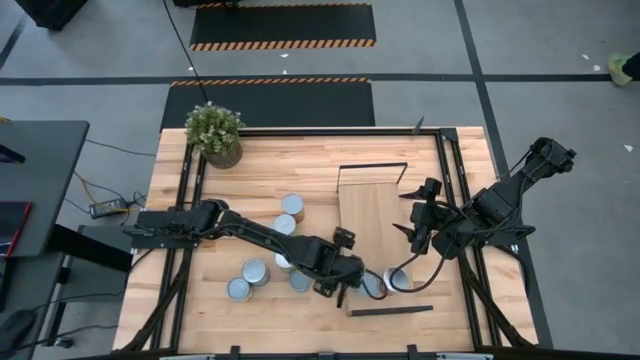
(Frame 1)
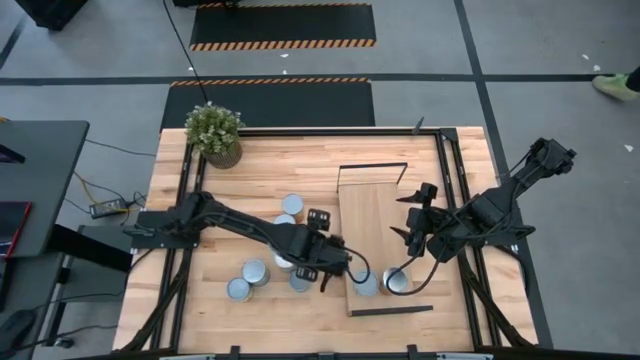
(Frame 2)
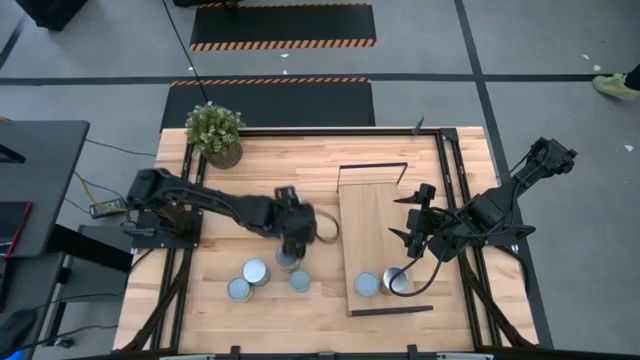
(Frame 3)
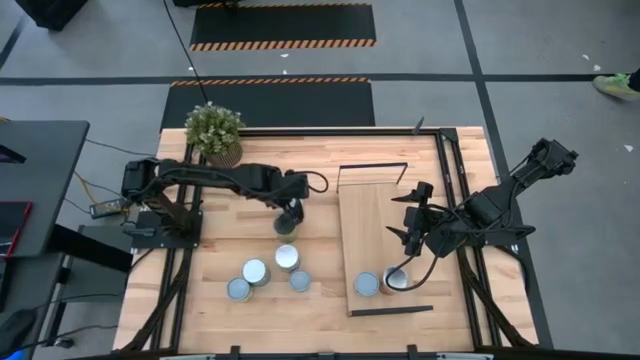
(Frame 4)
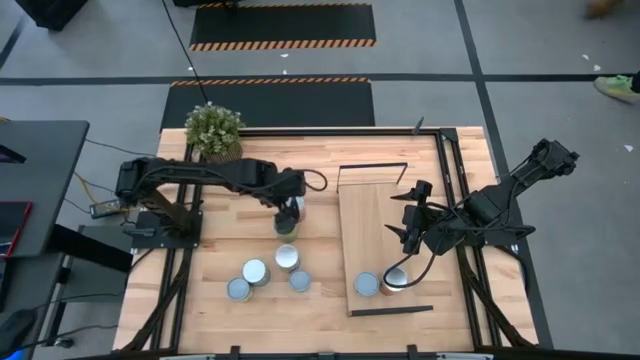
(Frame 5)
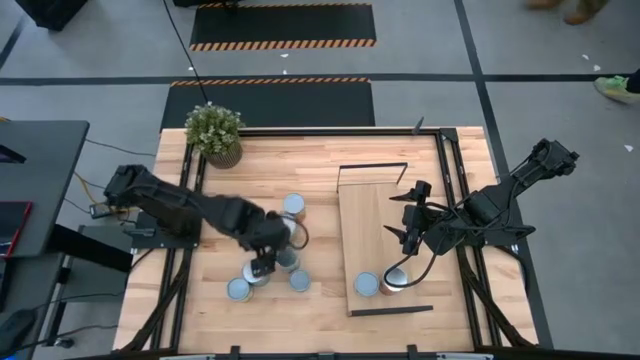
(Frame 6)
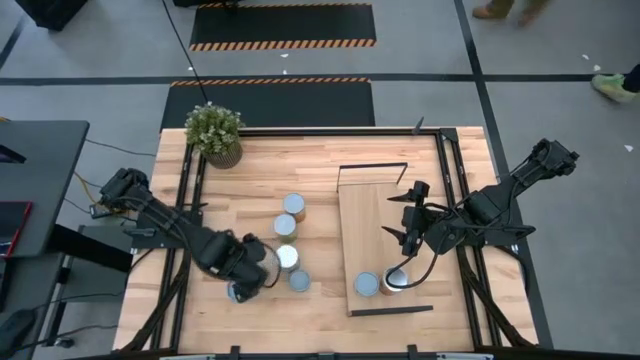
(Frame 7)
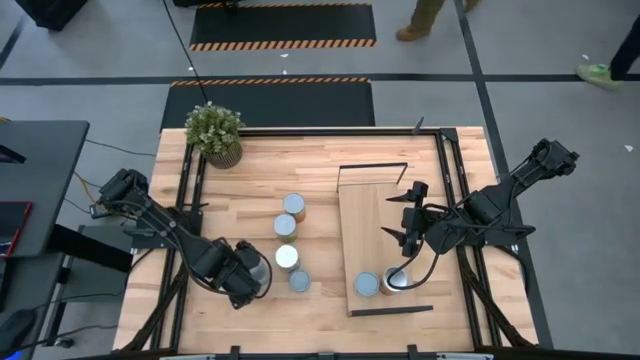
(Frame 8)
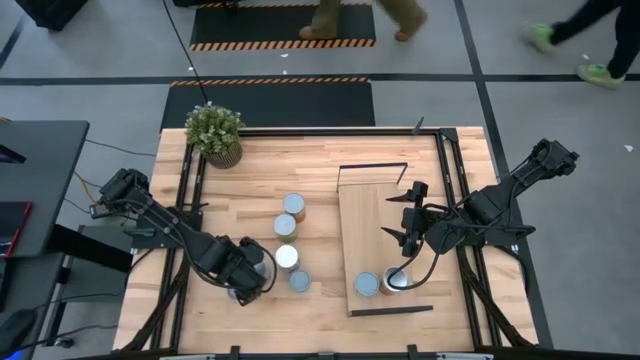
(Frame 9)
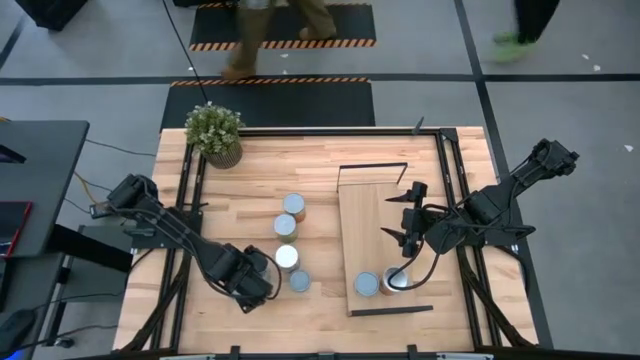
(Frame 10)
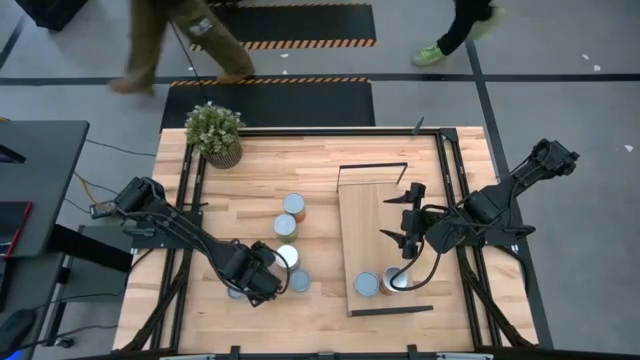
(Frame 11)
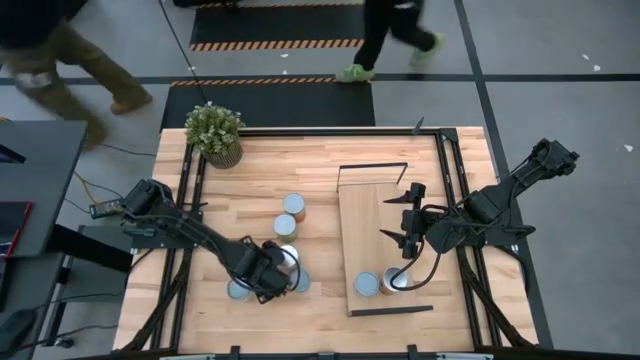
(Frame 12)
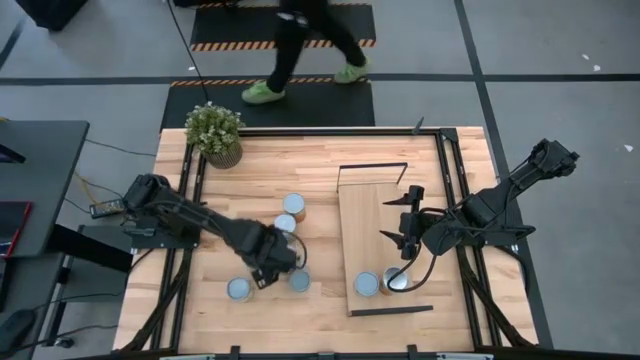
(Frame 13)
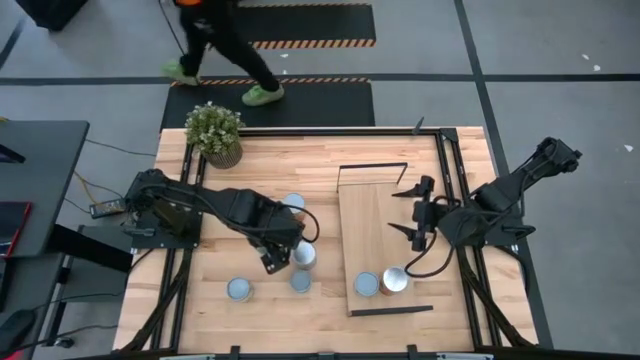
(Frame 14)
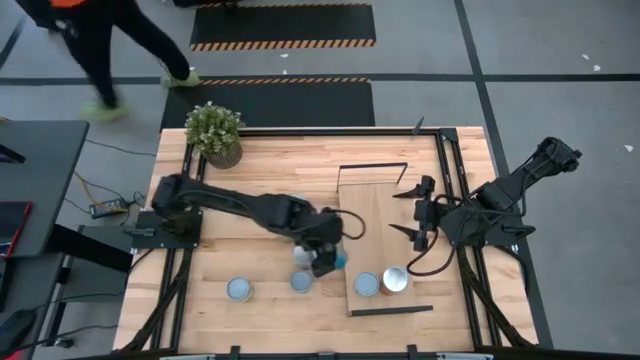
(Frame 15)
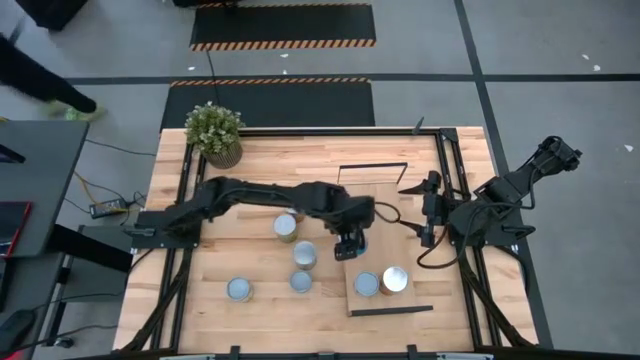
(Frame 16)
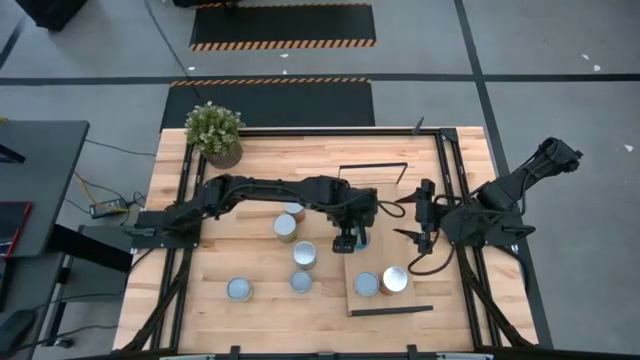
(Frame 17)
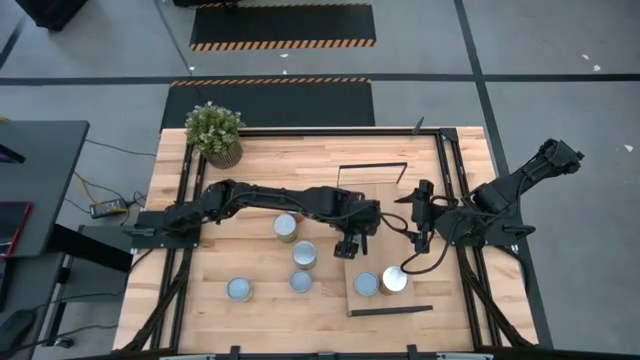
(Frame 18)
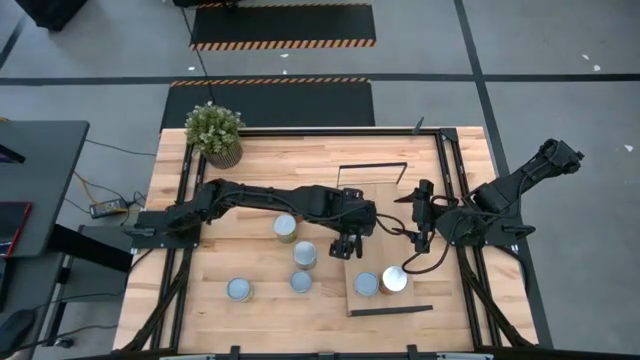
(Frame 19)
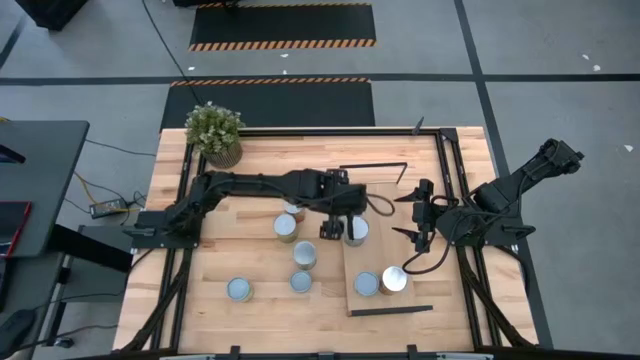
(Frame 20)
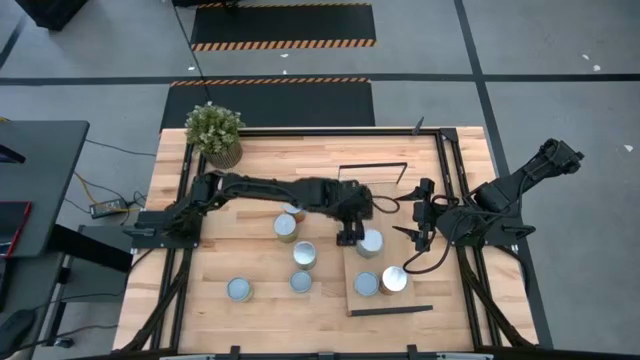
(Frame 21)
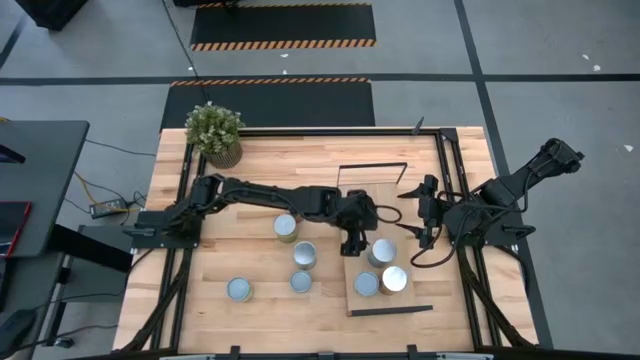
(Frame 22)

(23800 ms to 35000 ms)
Task: Pick and place cans onto a shelf
Put the canned cherries on the shelf

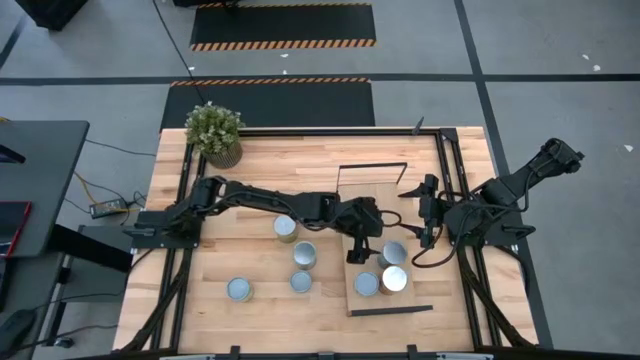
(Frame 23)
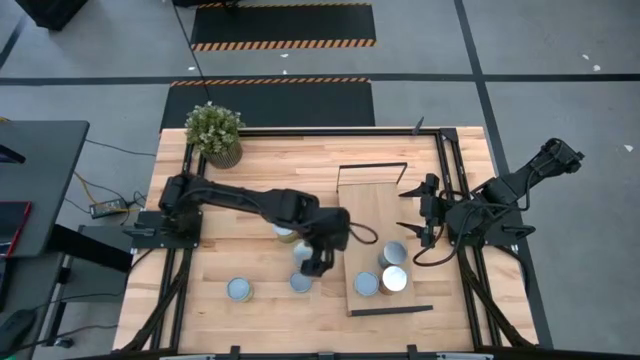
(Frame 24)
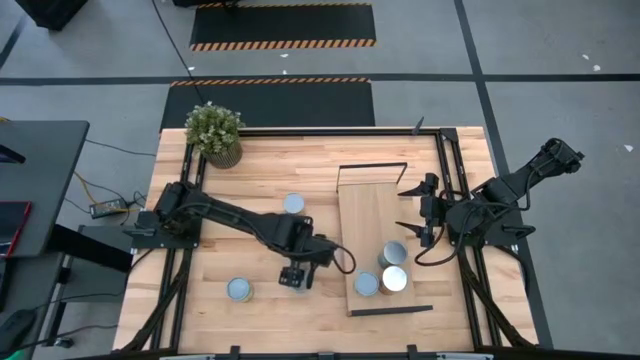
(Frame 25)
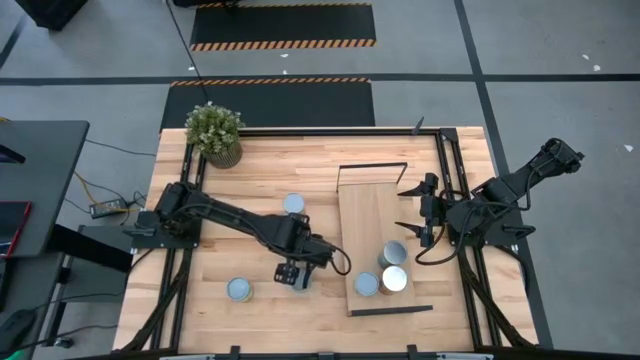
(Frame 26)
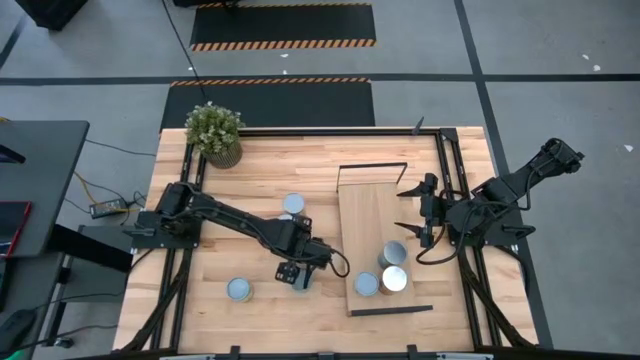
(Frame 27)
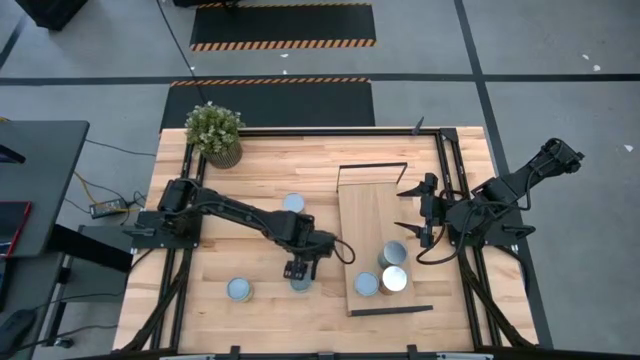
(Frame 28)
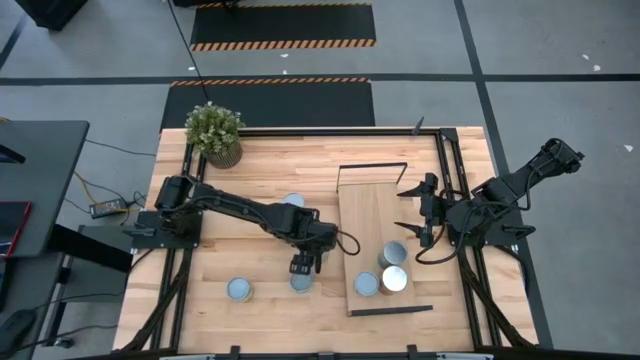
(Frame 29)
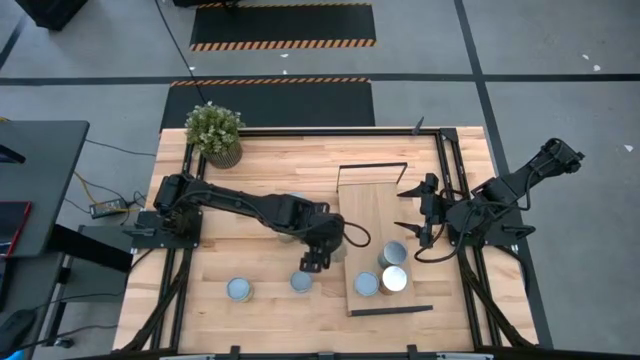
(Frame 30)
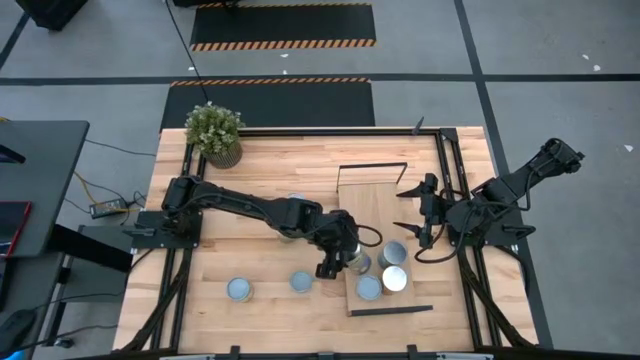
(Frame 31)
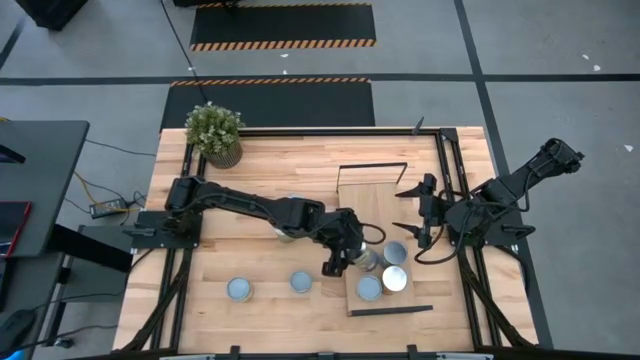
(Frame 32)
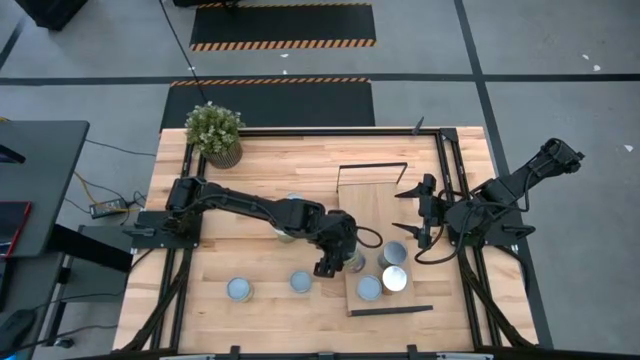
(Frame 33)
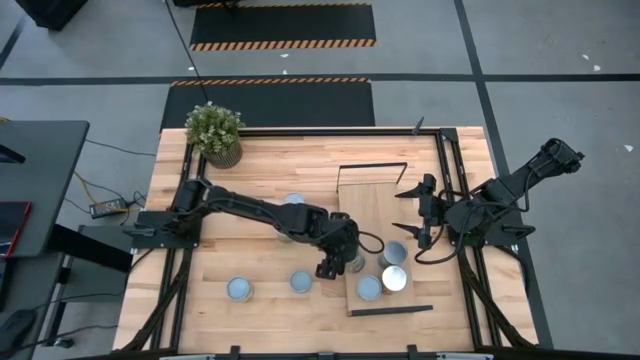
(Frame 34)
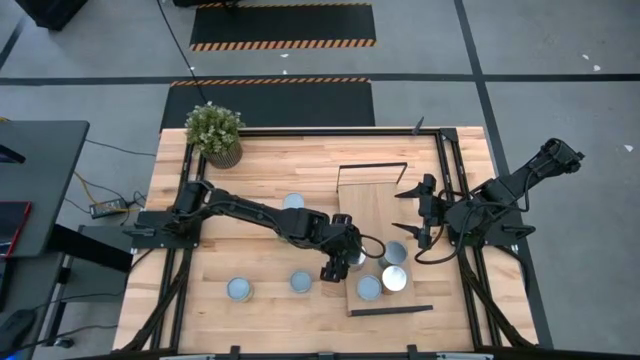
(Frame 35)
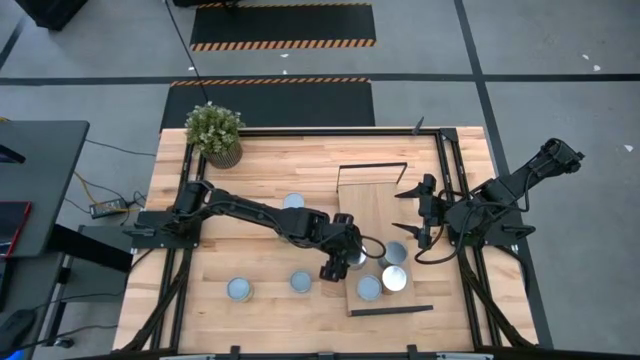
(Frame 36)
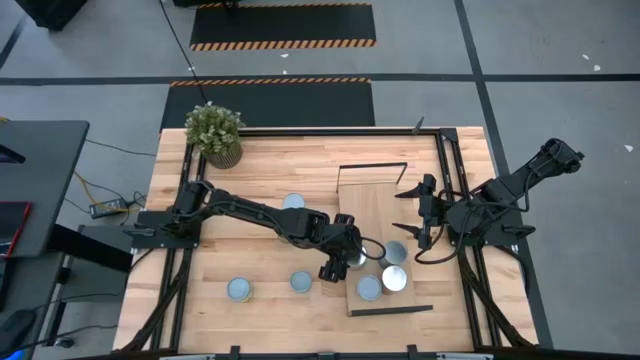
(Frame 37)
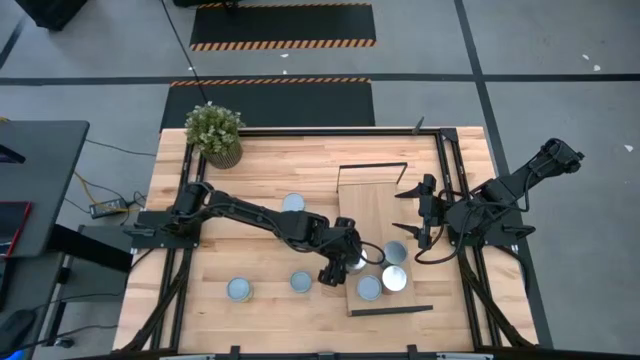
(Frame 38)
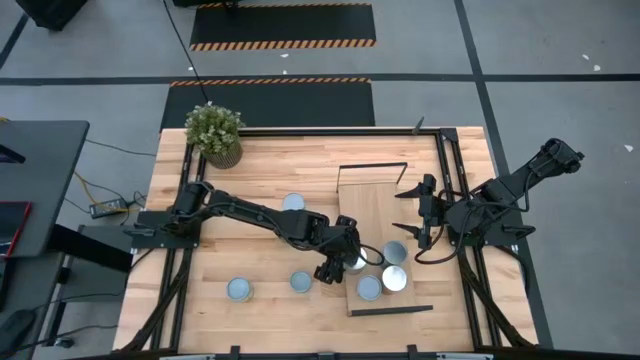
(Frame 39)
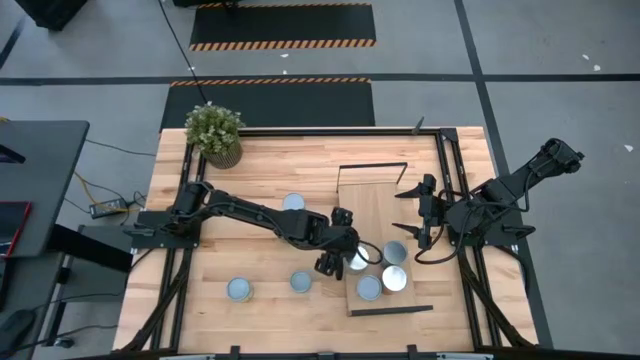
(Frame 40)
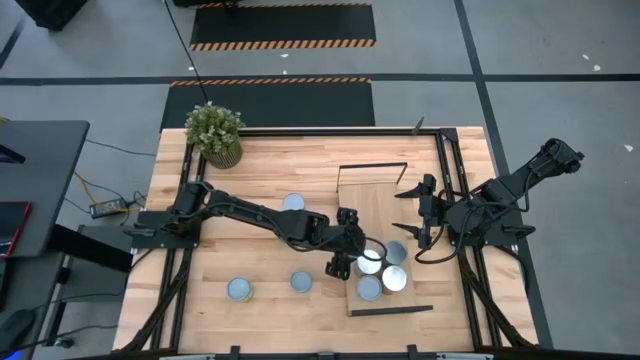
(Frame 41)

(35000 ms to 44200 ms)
Put the canned peaches on the shelf

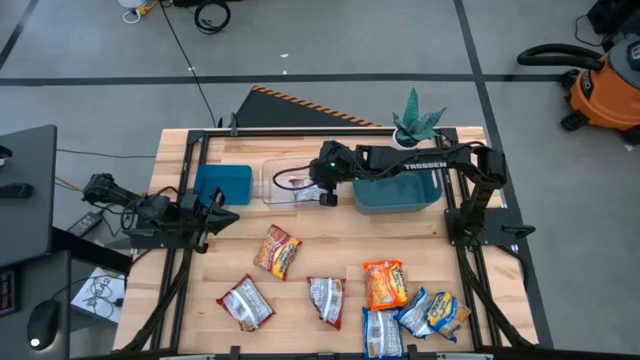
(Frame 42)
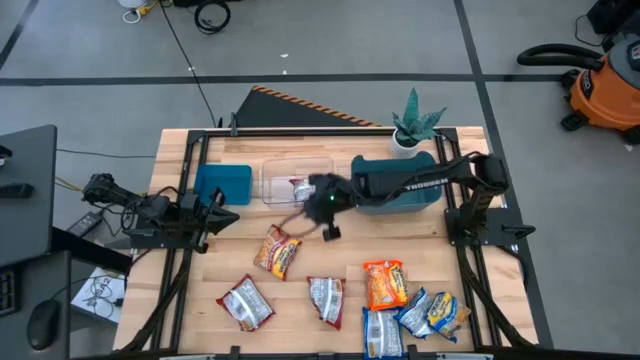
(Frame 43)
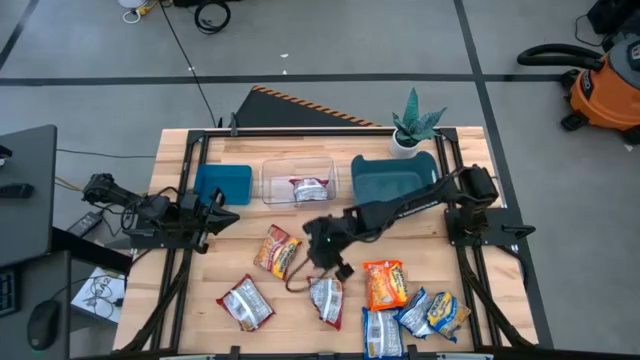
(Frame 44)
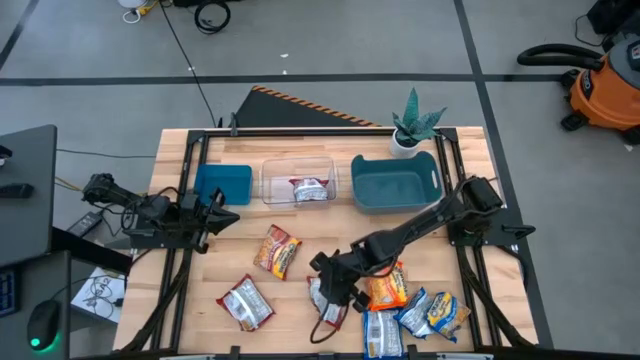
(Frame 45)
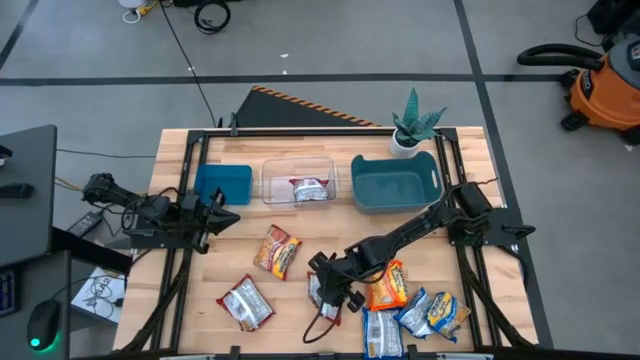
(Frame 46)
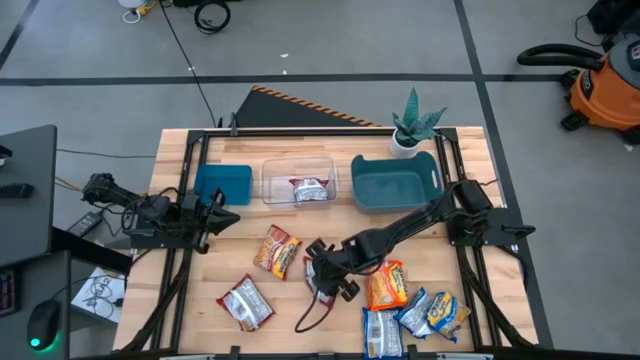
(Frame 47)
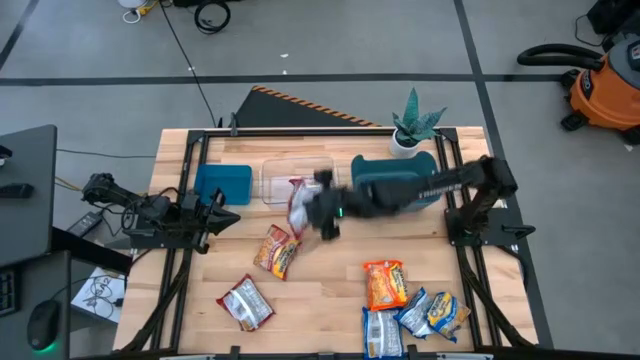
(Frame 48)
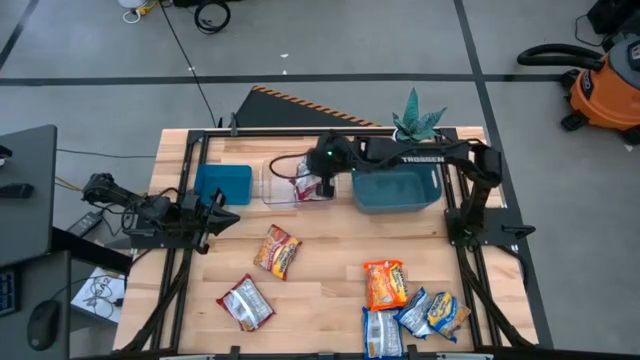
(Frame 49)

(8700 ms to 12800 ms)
Task: Sort Maruchan noodles
Put the red noodle pack into the transparent bin
